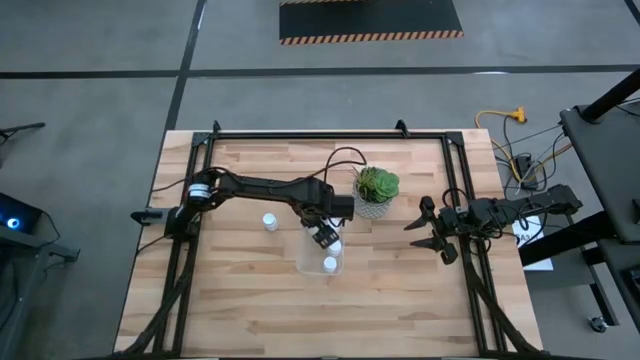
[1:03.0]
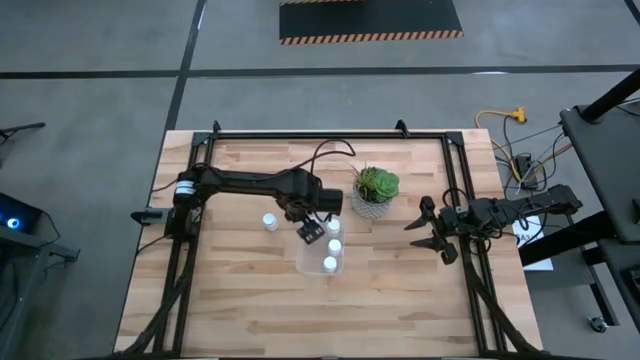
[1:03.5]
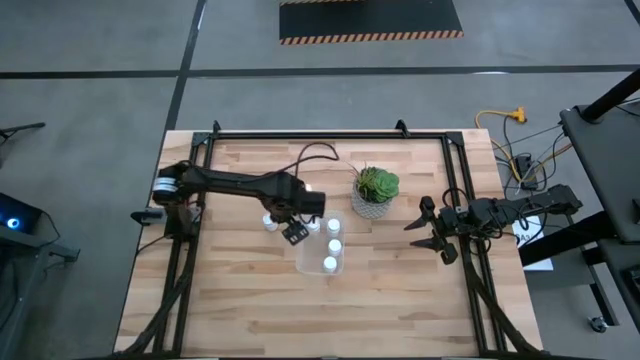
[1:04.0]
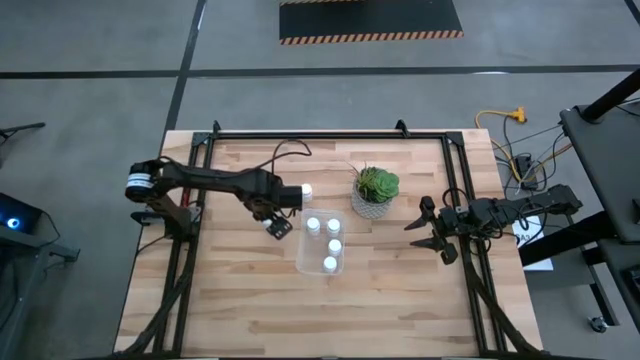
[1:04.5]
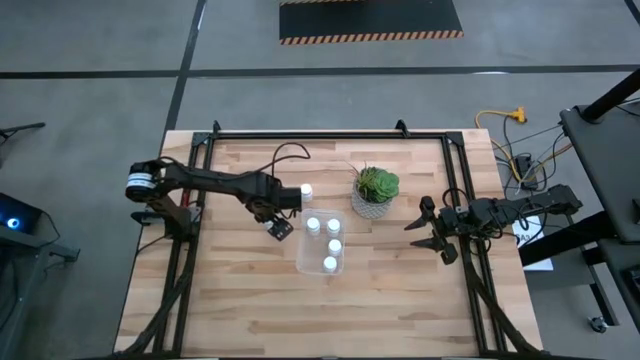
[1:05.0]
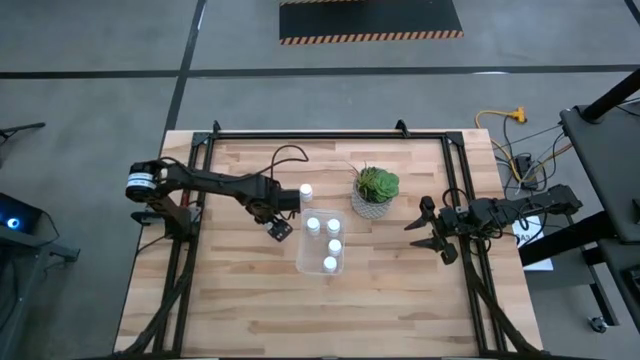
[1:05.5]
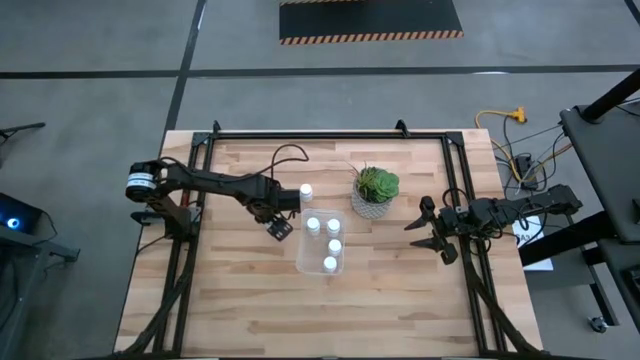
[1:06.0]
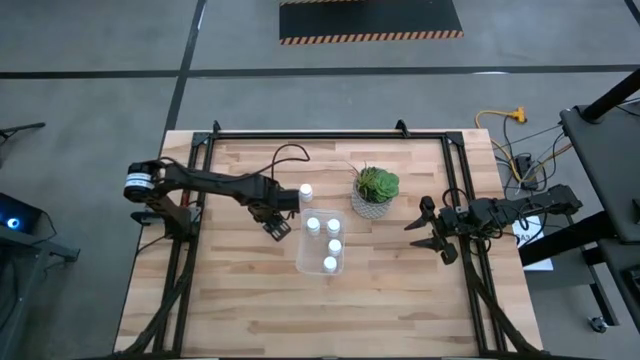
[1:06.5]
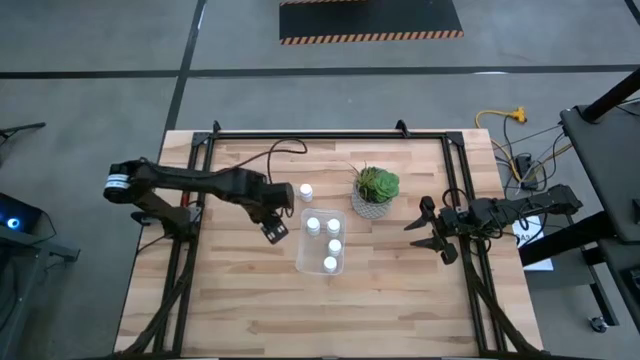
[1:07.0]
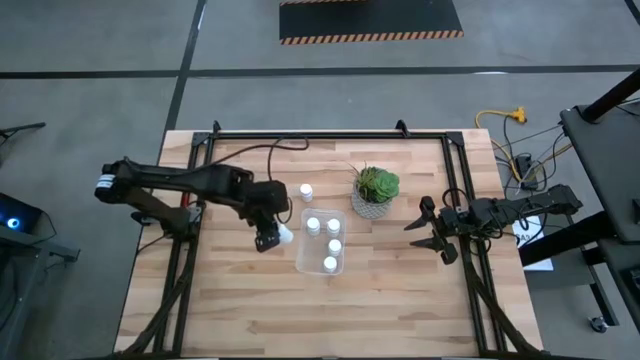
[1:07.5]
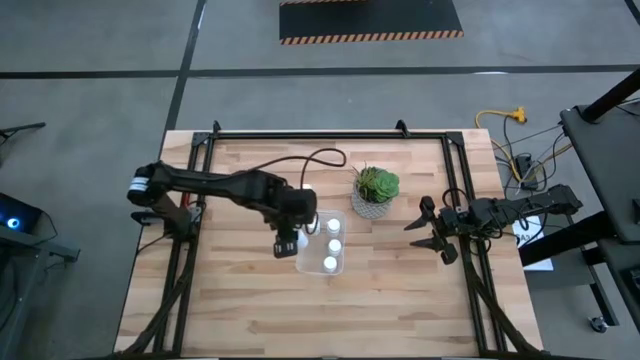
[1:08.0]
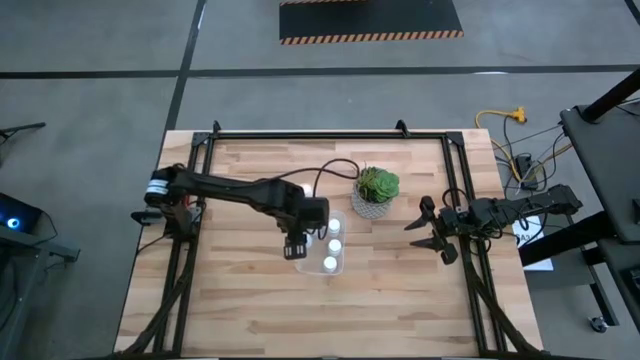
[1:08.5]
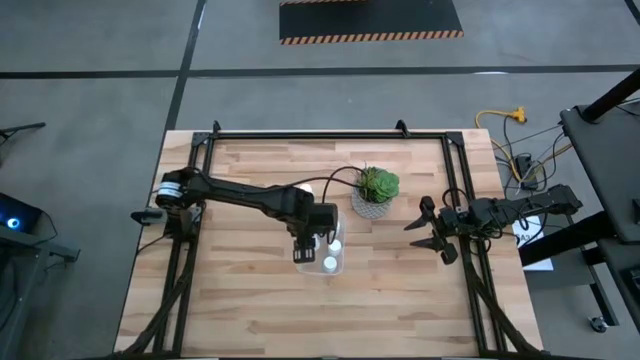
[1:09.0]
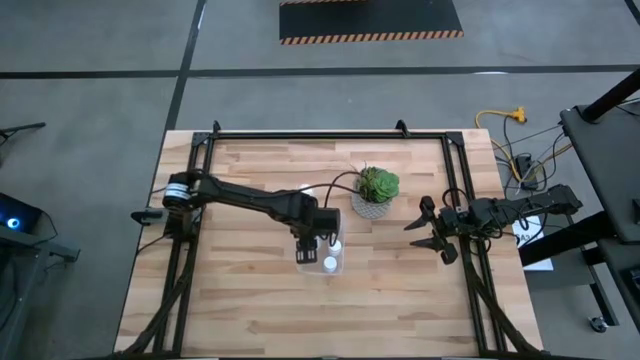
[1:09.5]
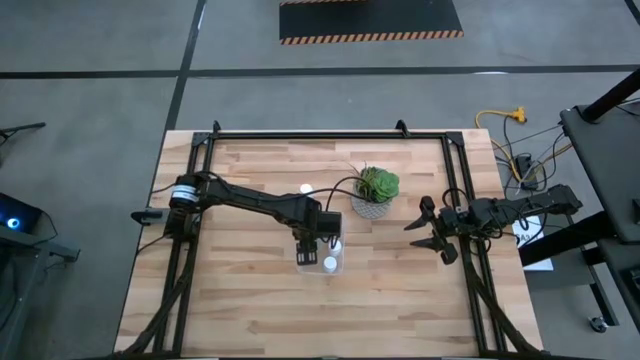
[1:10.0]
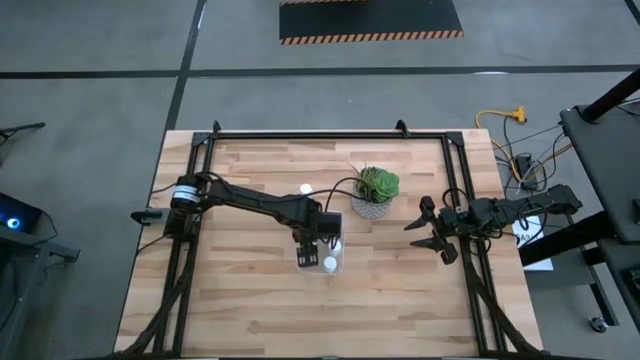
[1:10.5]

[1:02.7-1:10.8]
Task: Pick and place pill bottles into a basket
Put the white medicine bottle into the transparent bin

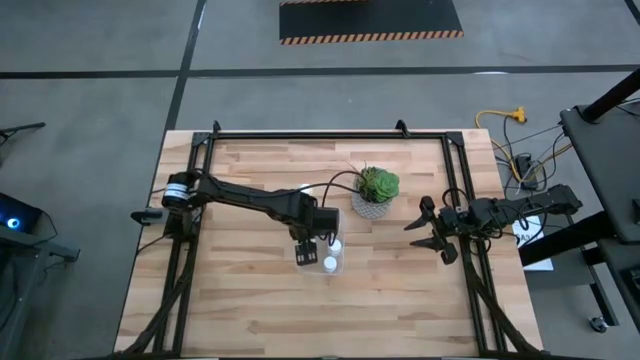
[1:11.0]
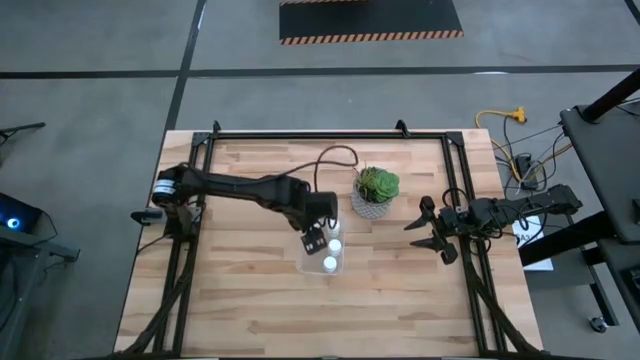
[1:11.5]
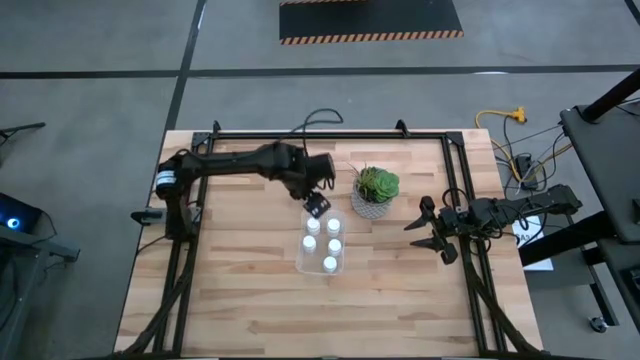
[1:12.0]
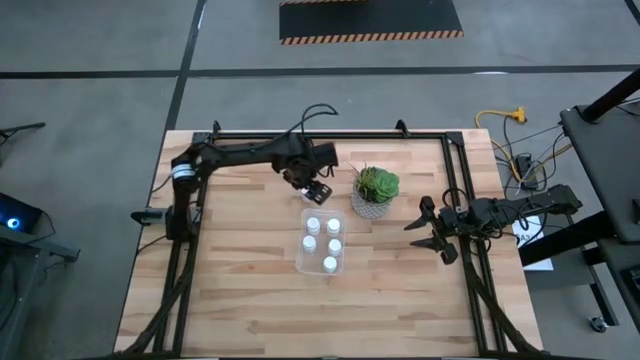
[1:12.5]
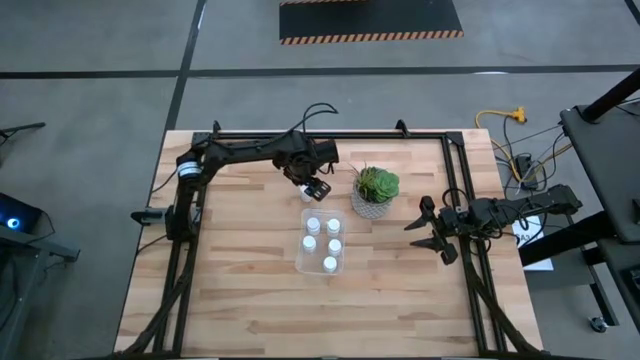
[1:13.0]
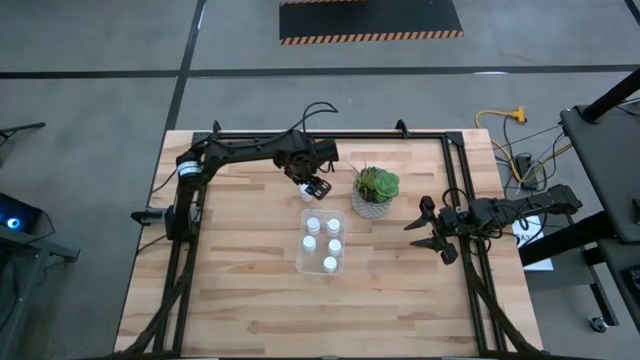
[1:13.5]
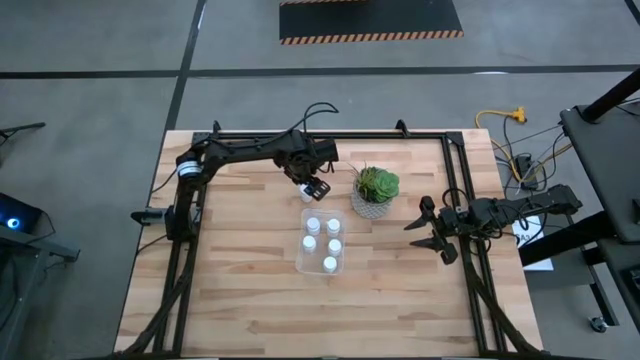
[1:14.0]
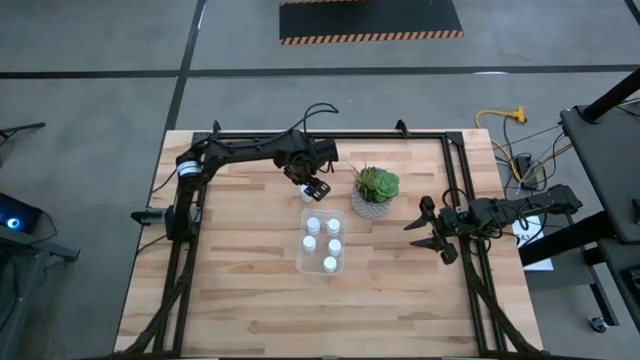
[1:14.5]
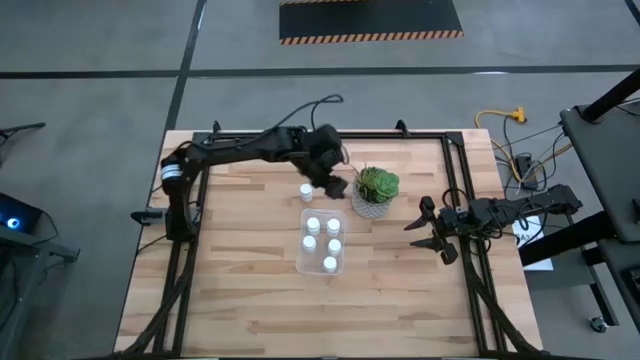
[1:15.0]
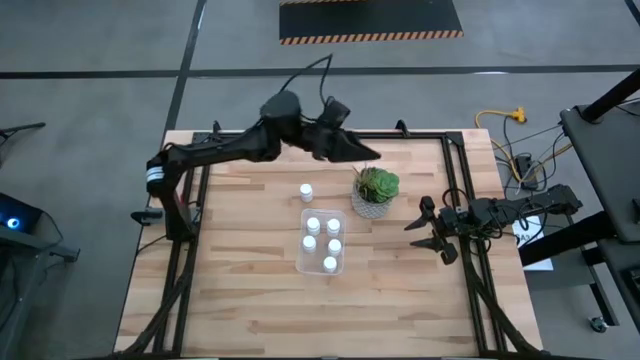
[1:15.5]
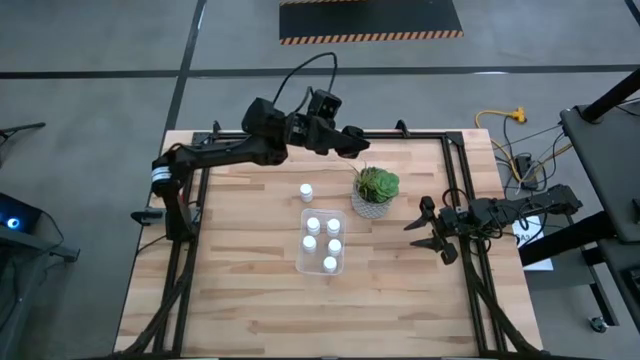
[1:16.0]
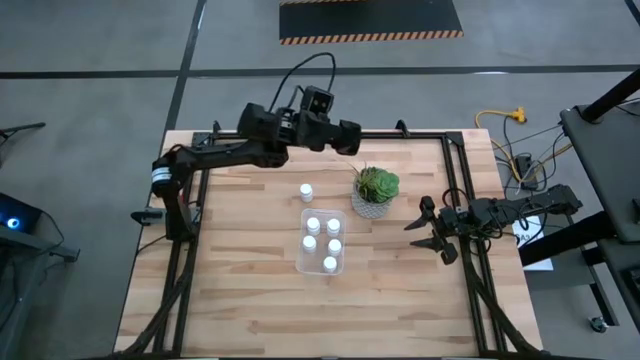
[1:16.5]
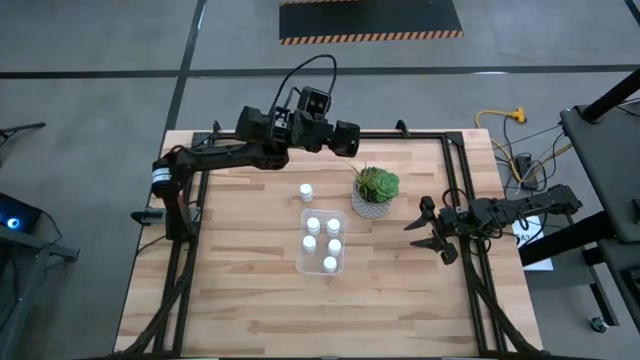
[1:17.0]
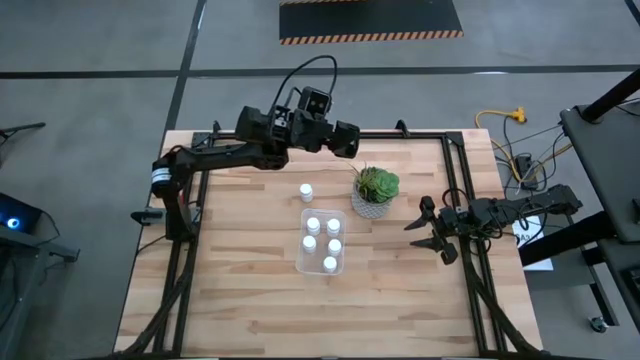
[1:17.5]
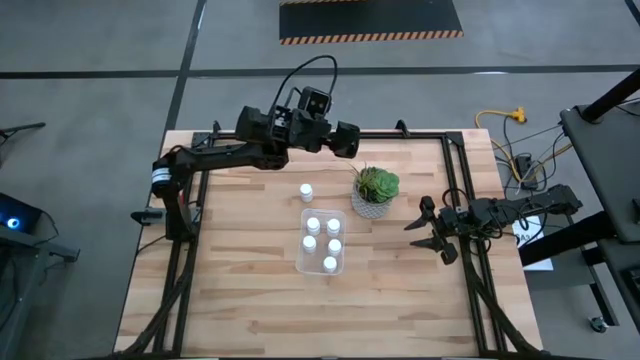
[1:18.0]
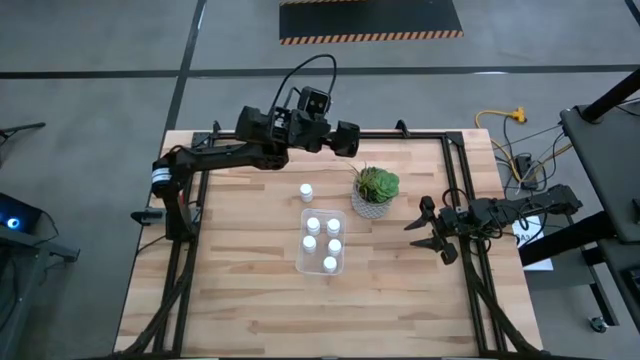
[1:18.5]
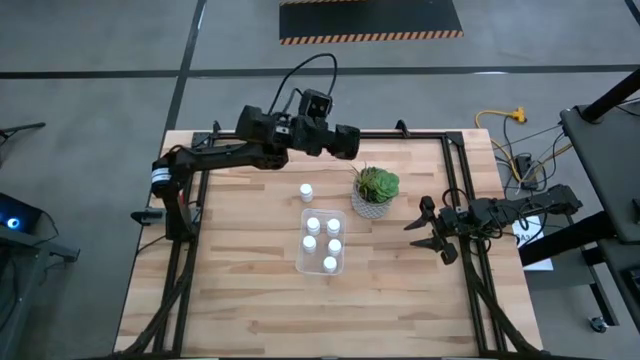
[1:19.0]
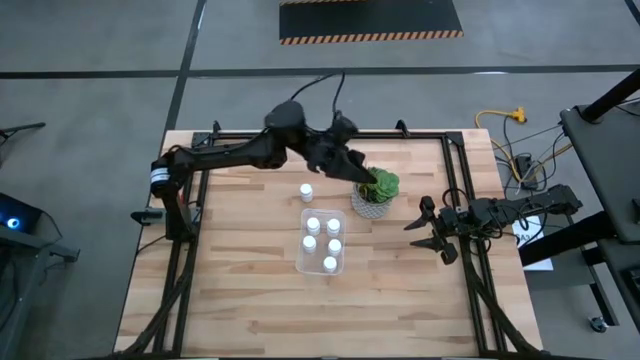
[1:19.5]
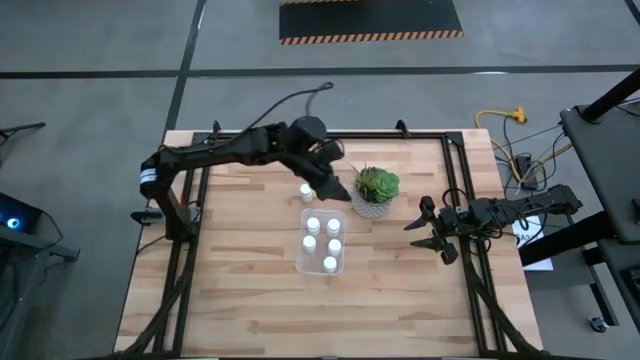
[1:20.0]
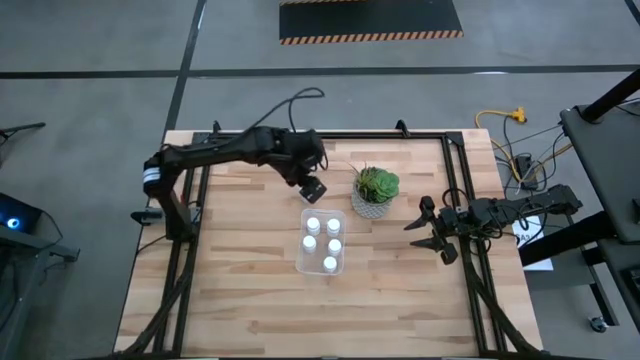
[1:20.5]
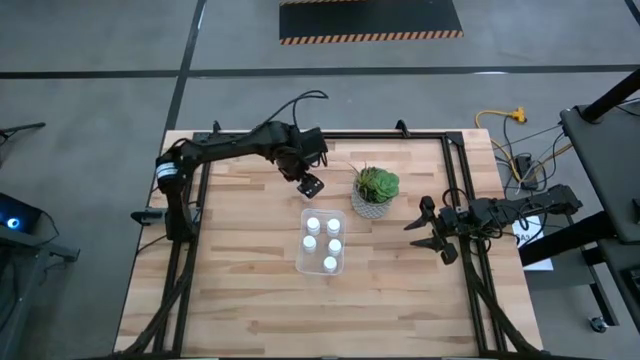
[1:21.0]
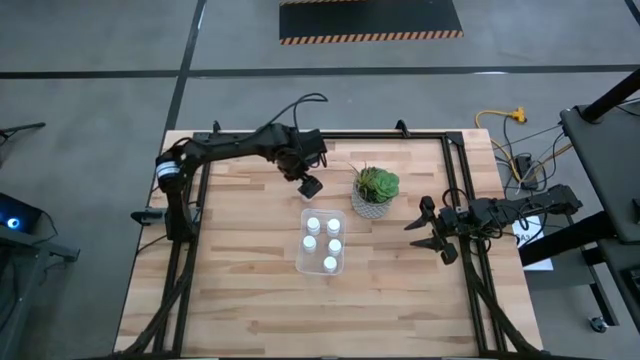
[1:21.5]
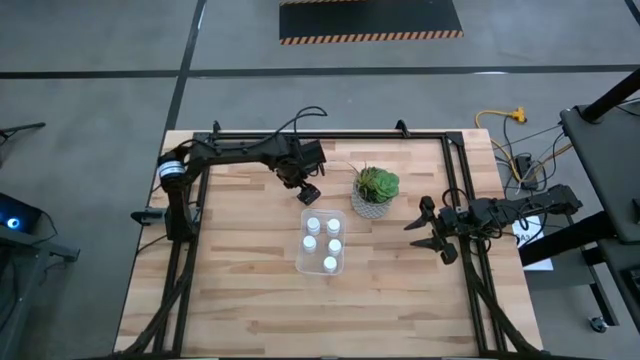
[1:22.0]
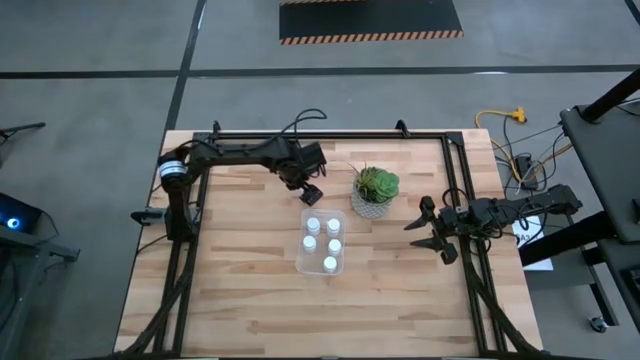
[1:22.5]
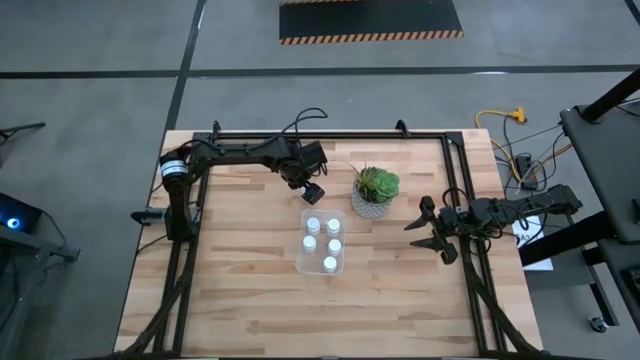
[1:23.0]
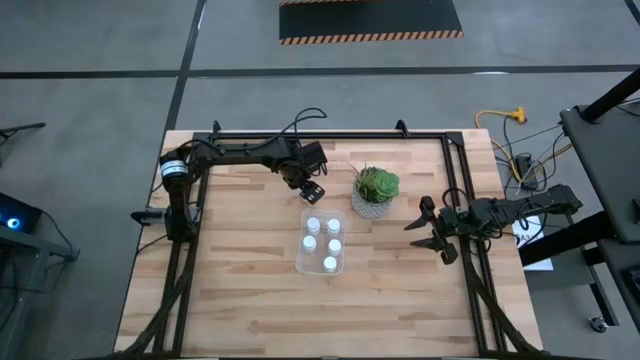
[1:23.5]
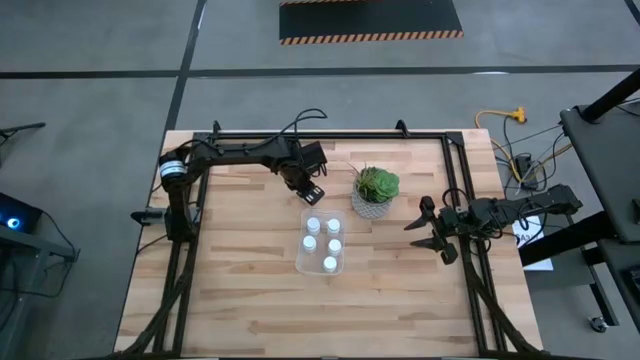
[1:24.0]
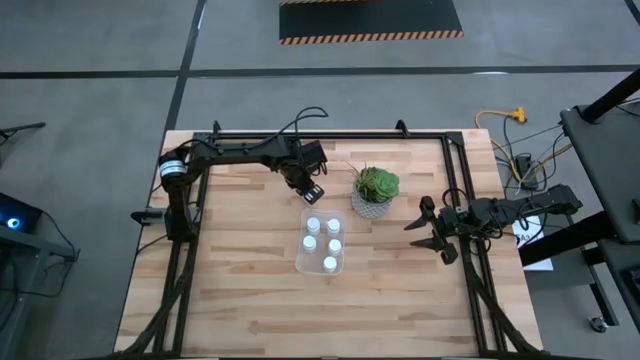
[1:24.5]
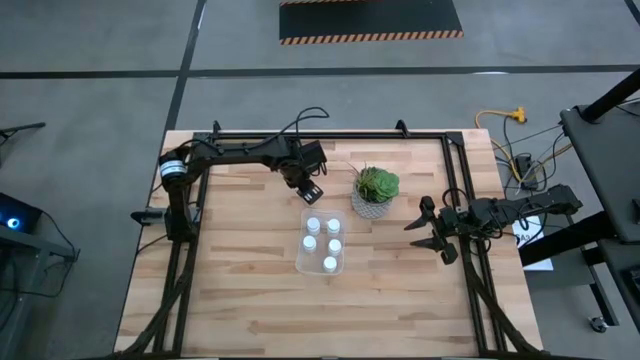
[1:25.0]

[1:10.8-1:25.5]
Put the white medicine bottle into the transparent bin
